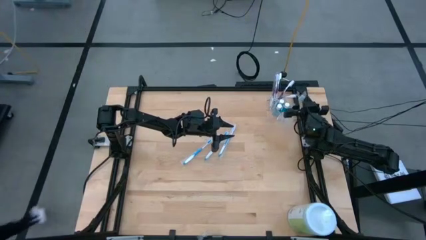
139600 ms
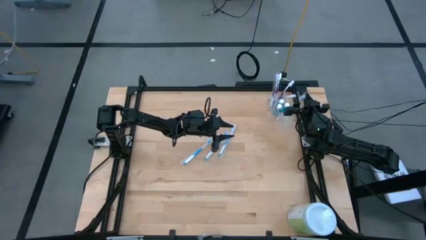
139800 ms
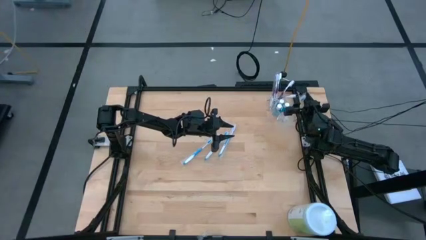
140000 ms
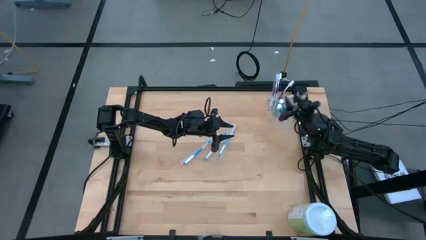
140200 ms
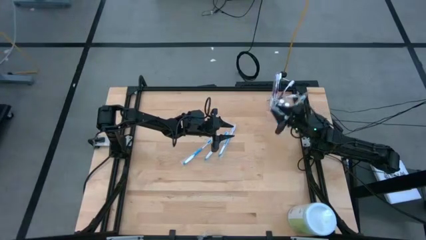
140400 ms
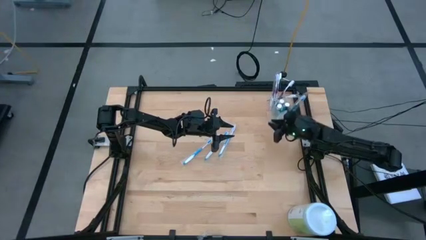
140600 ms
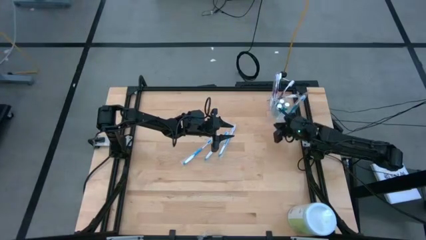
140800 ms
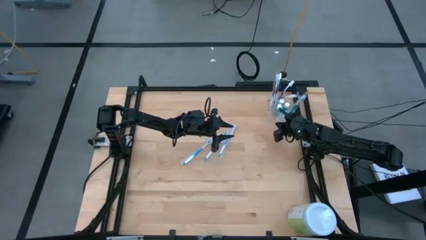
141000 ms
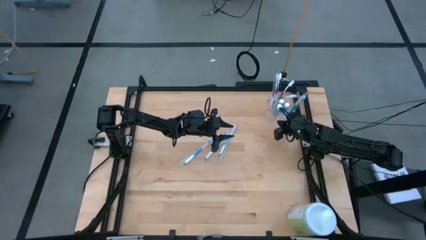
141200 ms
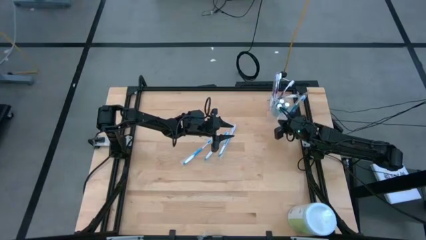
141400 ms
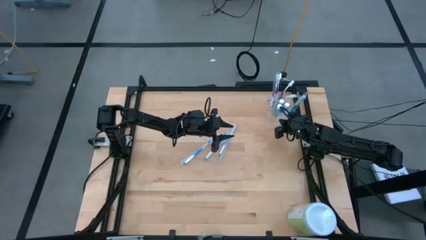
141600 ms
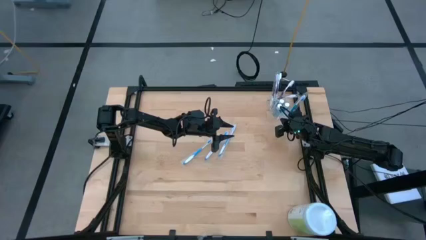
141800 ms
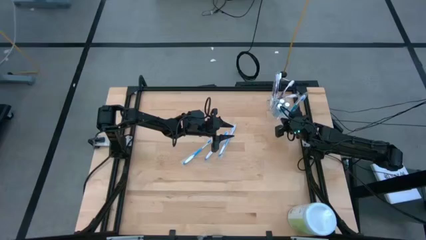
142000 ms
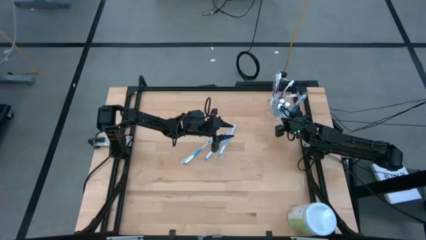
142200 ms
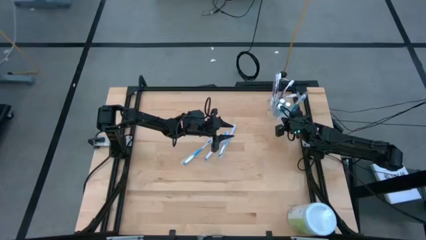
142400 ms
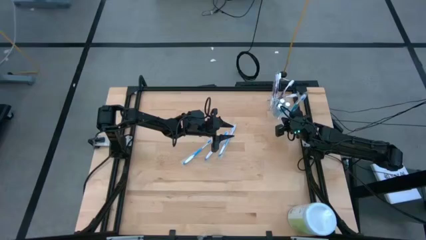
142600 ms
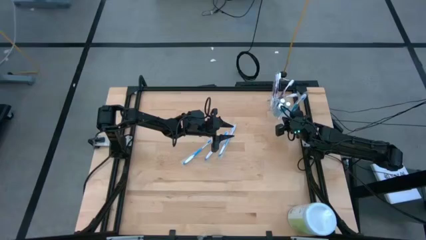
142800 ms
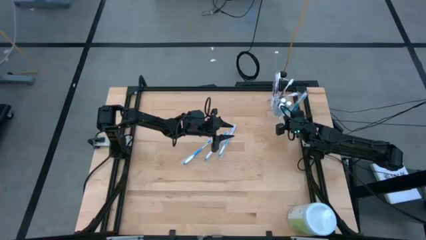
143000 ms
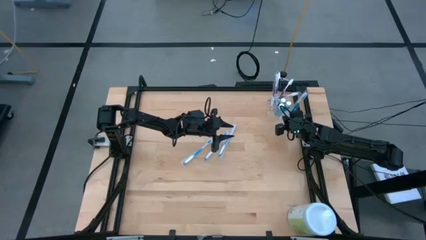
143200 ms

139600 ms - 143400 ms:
Task: Pick & Place toothbrushing station
Adjust the transparent organizer

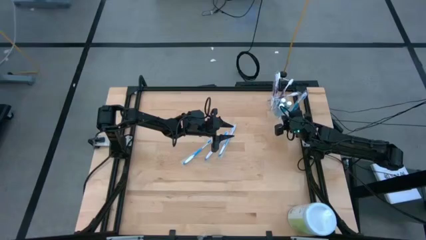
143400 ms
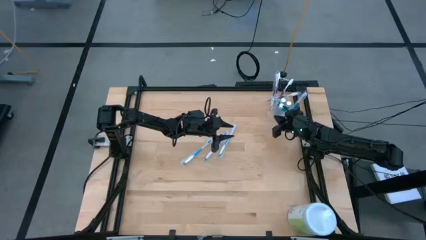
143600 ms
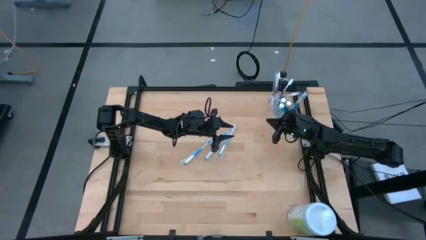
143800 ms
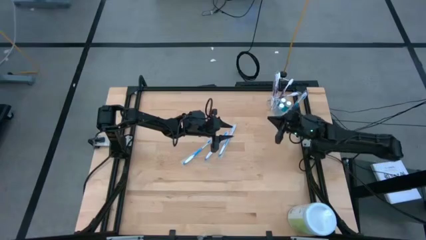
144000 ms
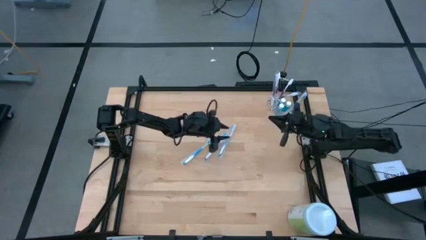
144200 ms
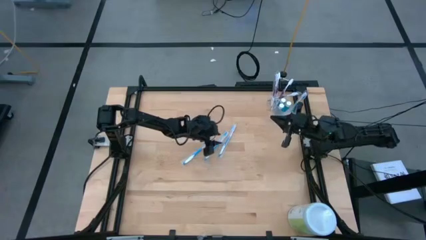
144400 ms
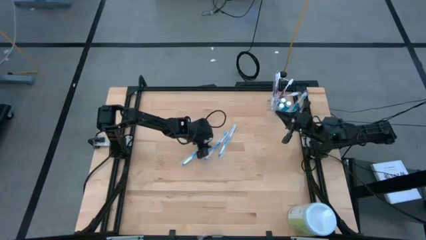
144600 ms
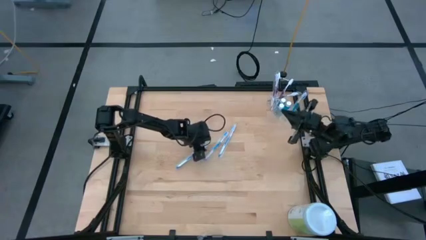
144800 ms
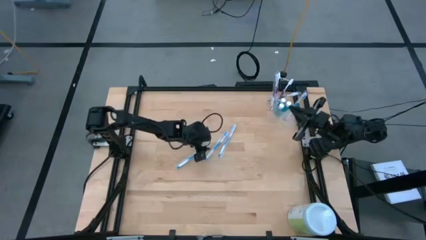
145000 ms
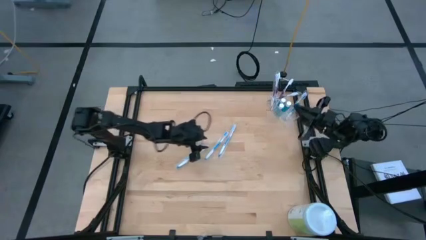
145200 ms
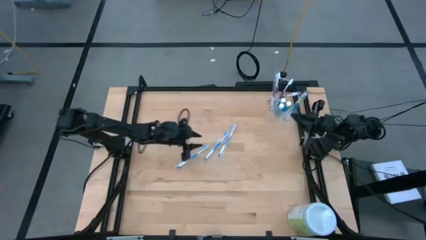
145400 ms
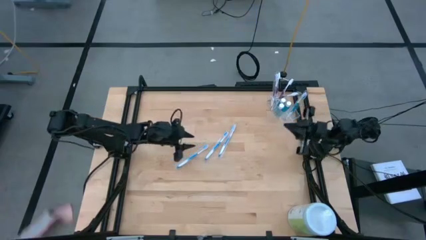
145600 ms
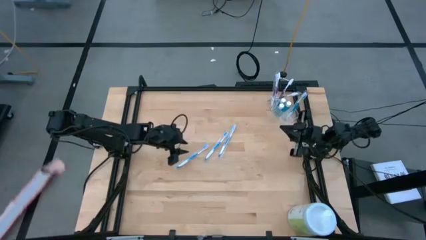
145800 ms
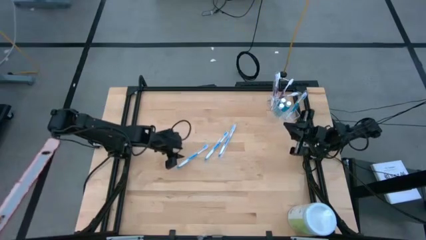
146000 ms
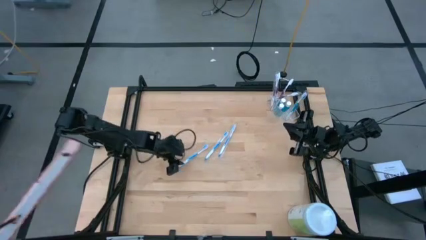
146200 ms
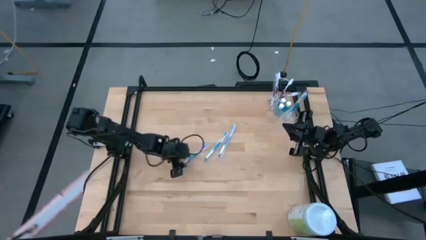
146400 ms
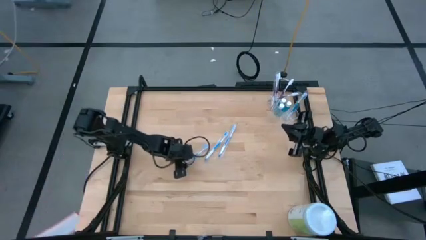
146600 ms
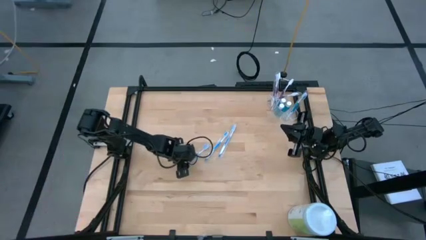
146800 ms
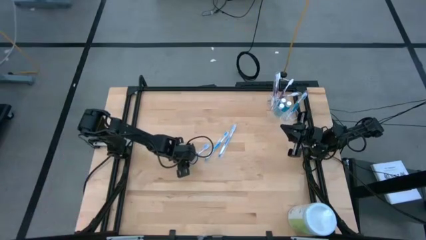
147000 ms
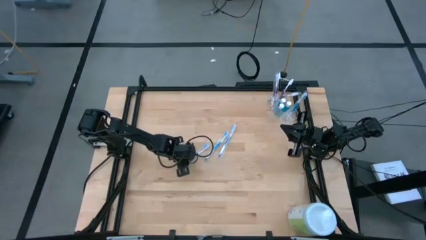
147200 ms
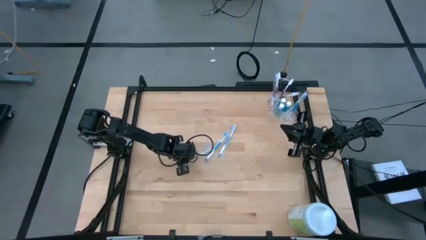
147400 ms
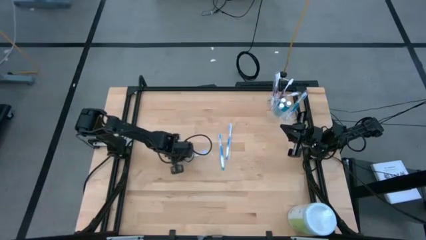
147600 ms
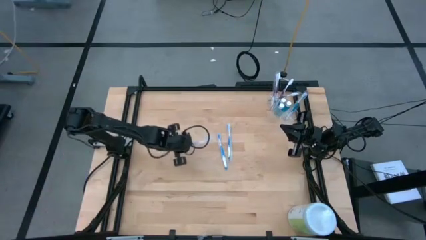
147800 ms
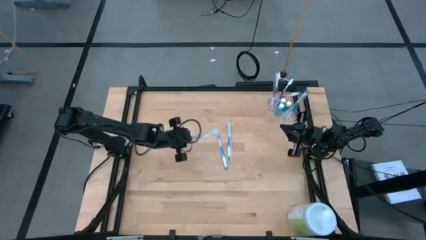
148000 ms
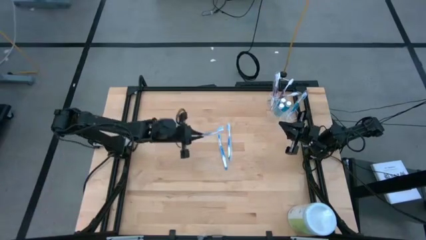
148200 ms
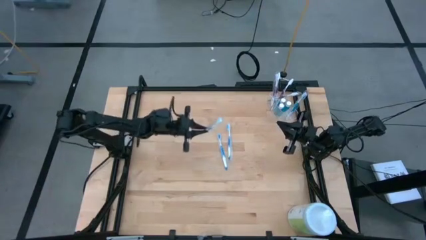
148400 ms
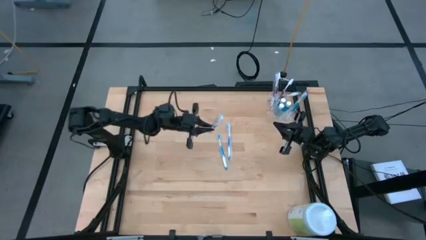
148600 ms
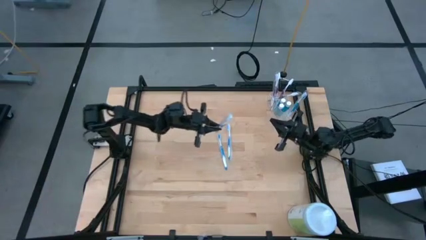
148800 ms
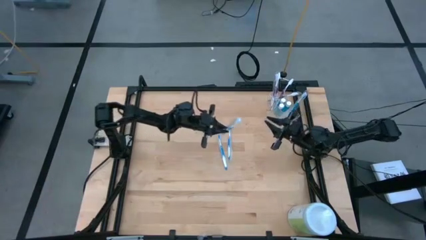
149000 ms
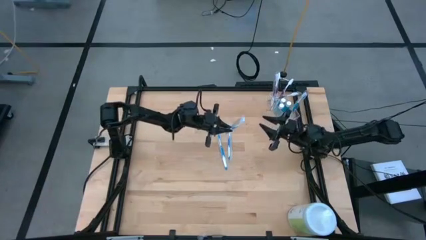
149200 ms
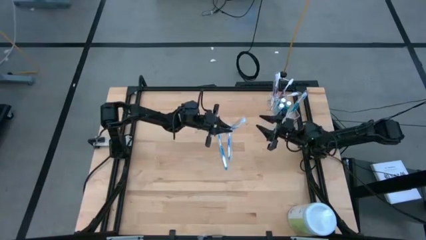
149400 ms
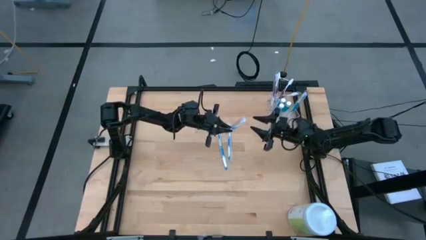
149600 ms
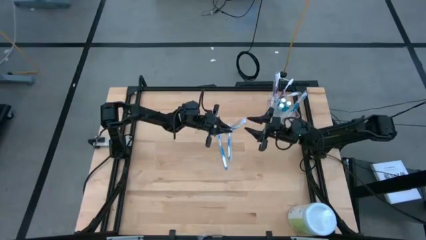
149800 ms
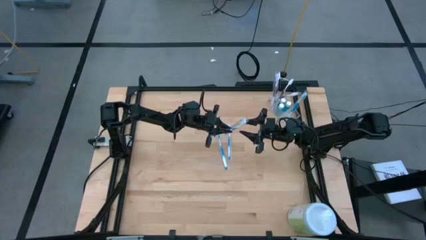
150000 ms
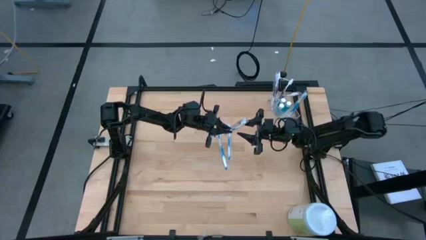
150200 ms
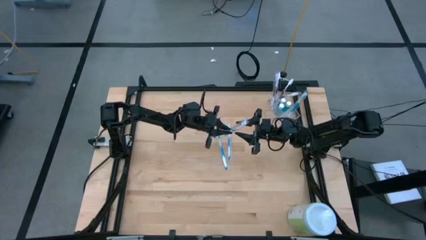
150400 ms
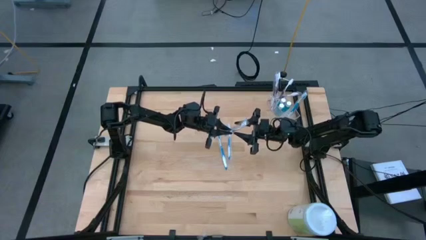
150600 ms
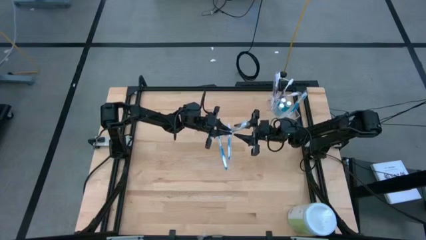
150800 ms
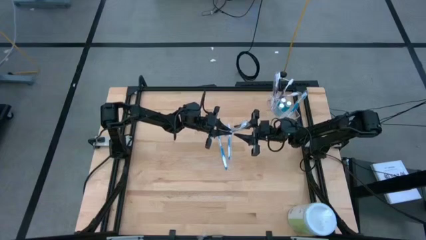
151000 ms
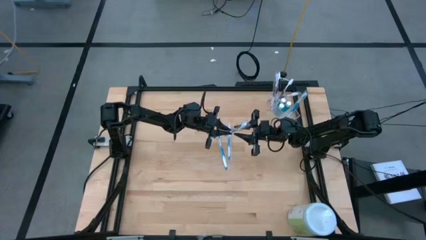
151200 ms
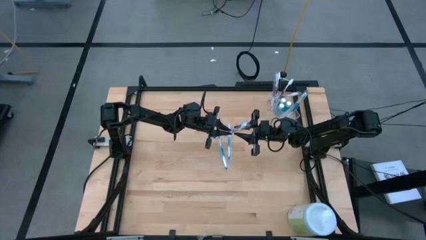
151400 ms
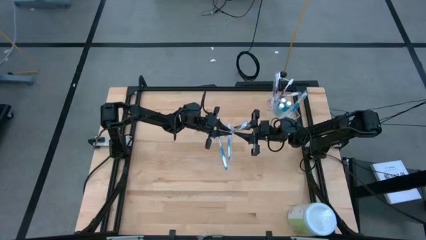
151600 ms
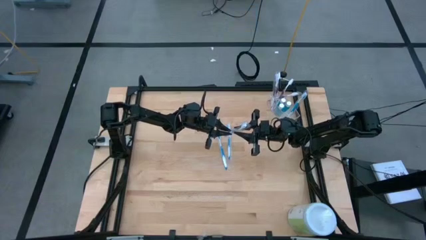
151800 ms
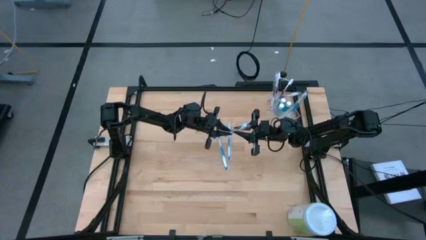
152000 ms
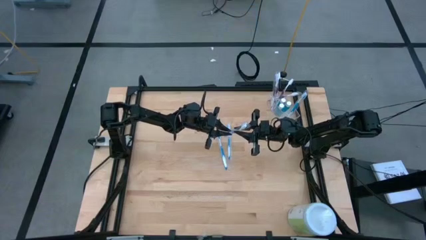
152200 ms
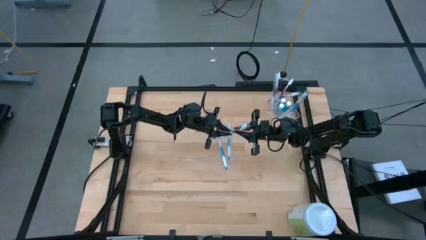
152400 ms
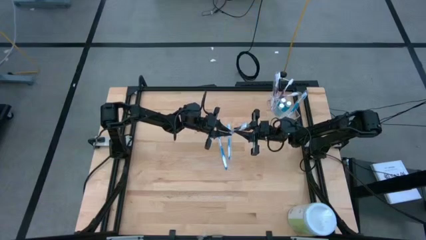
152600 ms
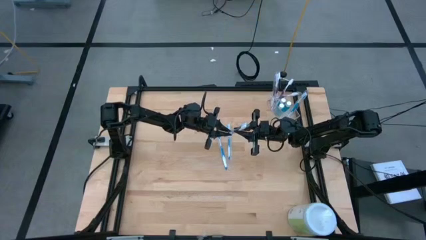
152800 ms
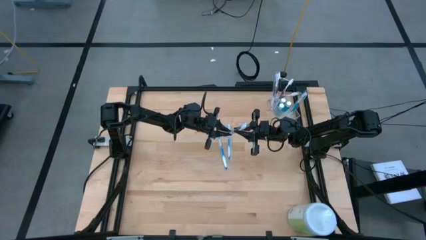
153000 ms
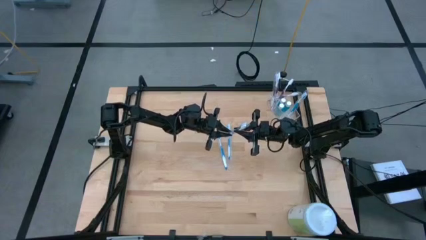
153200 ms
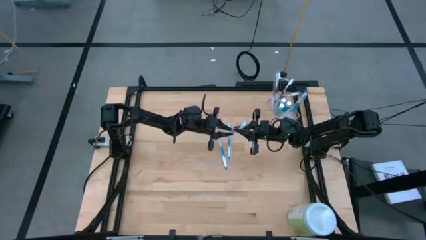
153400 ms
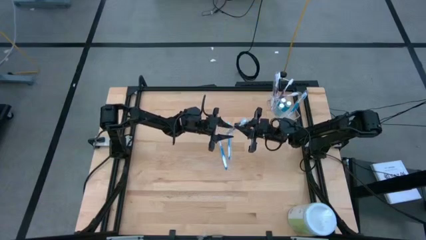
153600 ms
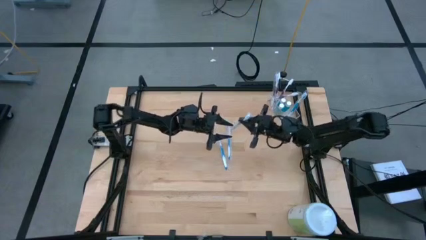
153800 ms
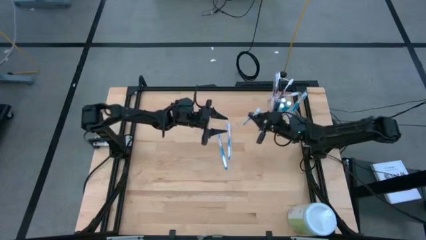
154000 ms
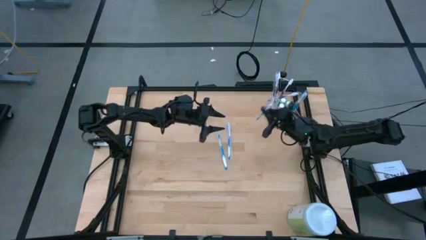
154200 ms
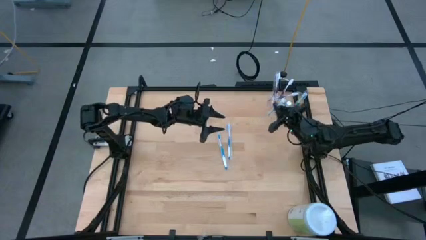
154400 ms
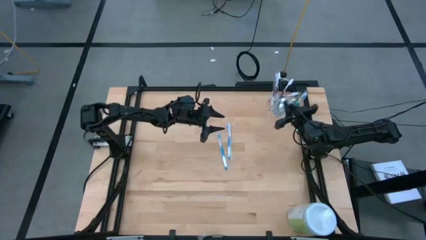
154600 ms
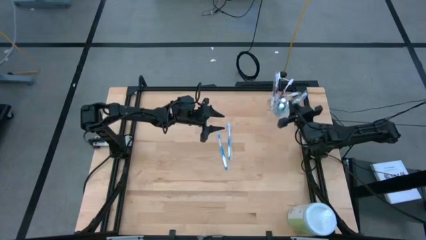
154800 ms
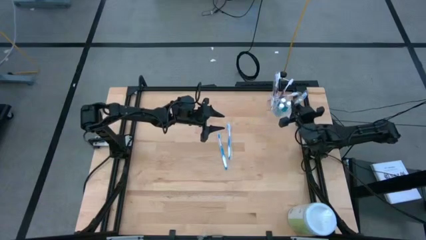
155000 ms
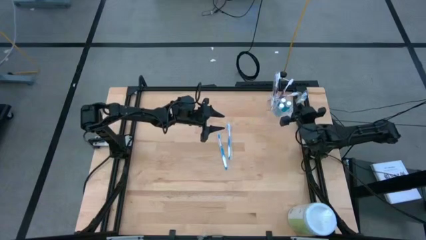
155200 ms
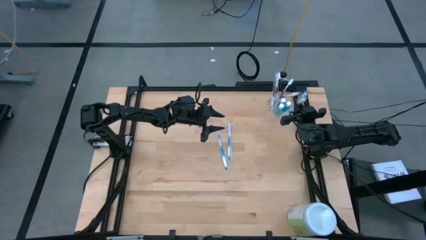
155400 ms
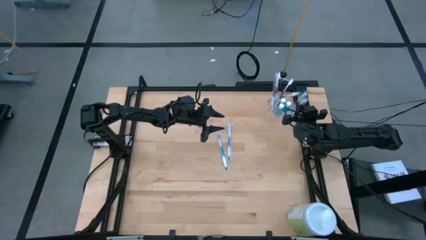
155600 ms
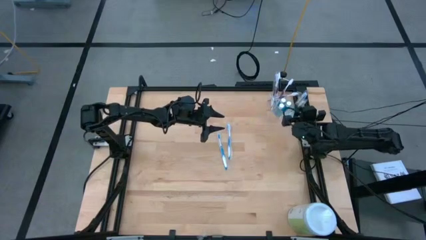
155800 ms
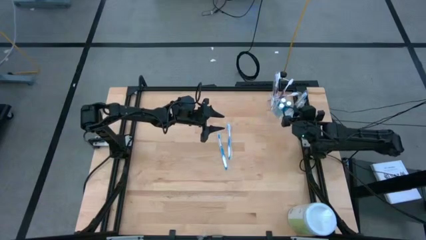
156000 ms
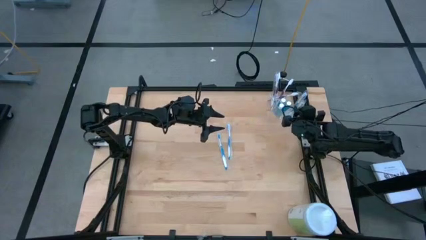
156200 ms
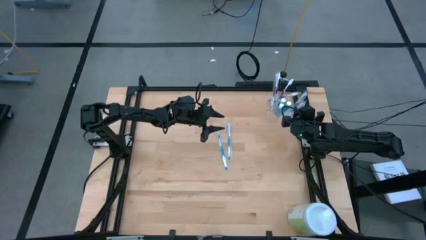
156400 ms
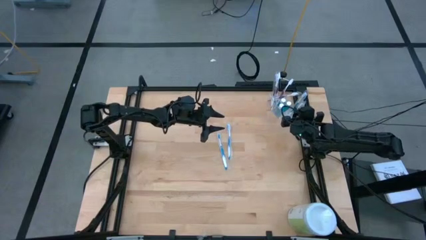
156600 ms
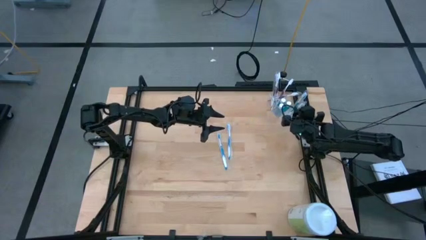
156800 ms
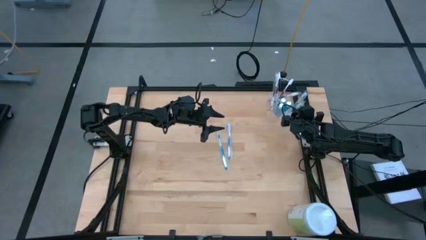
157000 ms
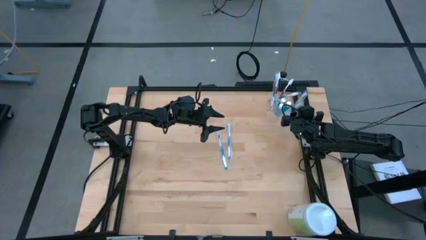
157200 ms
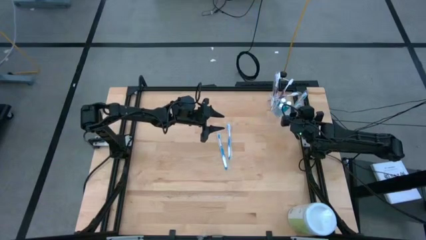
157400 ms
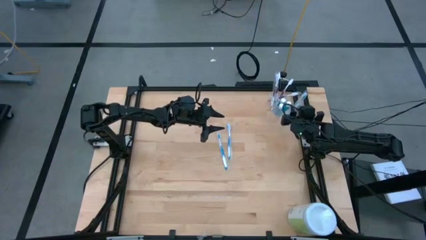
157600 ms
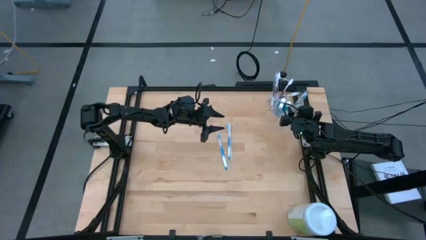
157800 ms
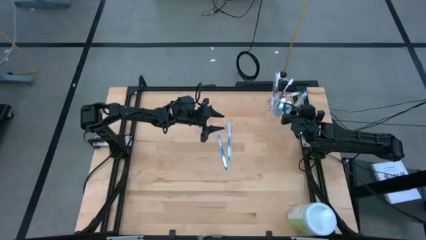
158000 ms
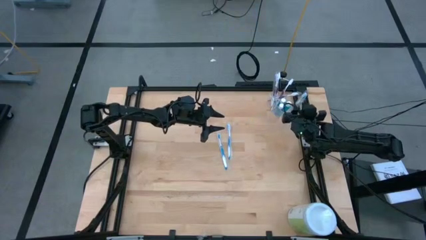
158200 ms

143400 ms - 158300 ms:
Put the blue toothbrush into the right of the transparent organizer
